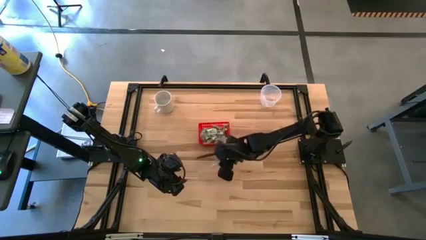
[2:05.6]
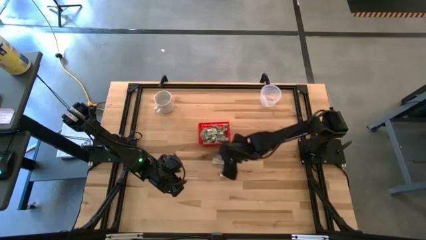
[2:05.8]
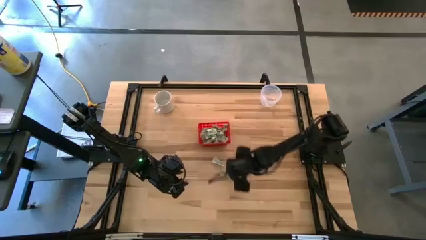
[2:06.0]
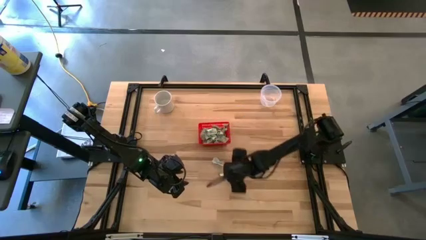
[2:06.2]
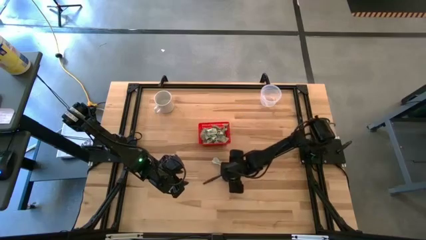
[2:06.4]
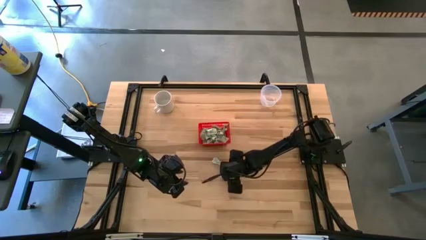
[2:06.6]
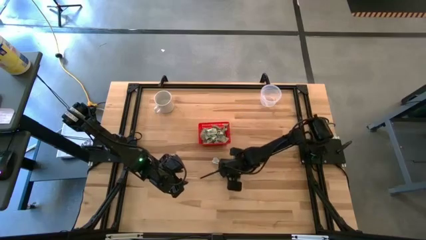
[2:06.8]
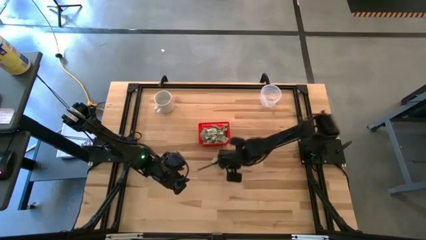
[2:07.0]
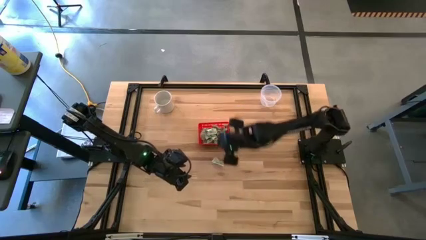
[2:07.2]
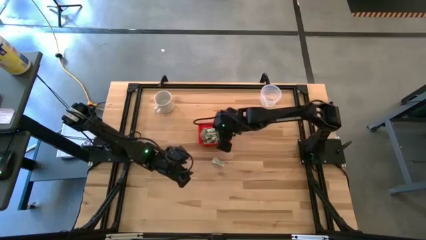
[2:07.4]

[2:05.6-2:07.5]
Task: Pick and place items into bin
Put the stevia packet into the red bin

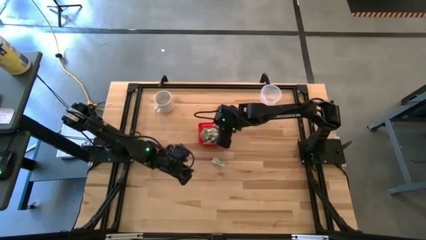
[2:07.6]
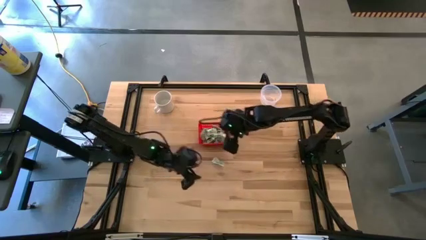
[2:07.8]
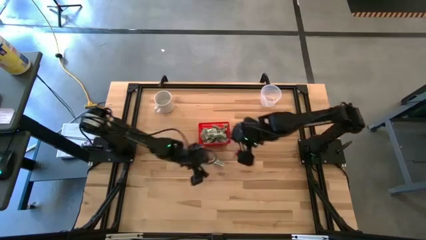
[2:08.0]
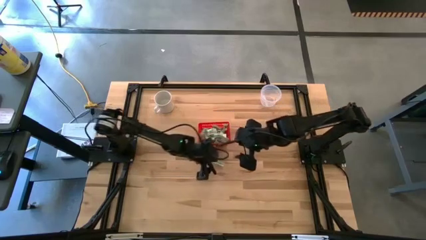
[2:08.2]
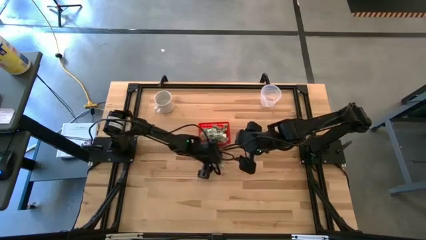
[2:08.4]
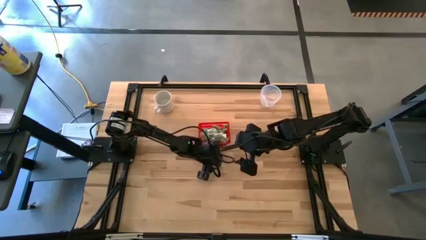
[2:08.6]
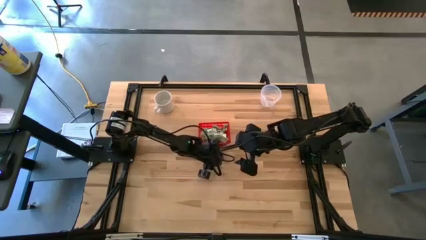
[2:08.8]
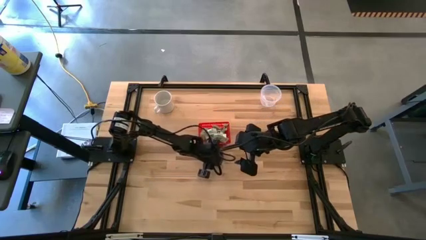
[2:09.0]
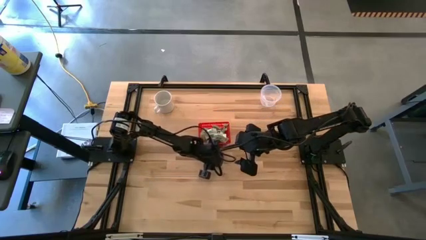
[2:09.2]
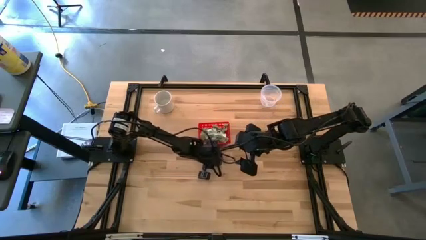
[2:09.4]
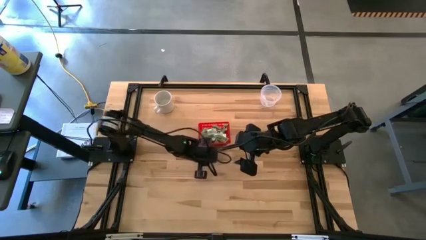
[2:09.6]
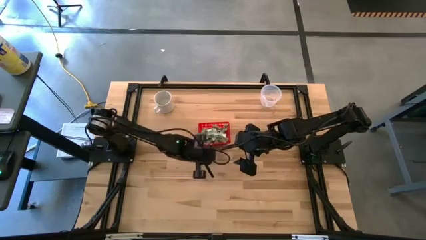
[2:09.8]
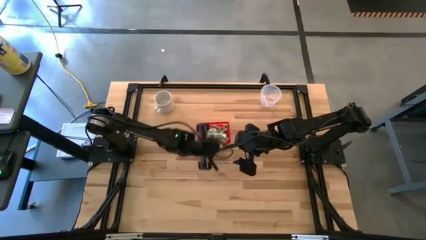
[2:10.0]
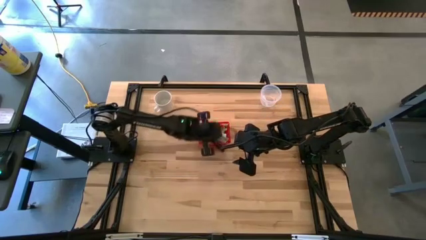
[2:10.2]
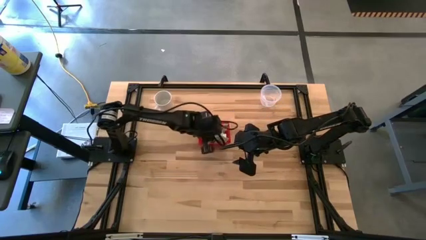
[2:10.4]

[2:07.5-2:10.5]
Put the stevia packet into the red bin

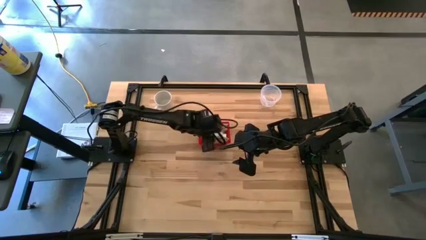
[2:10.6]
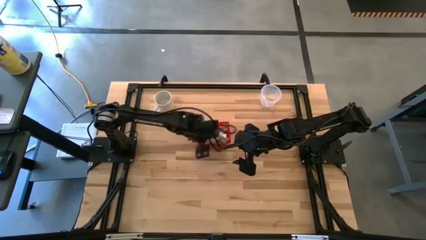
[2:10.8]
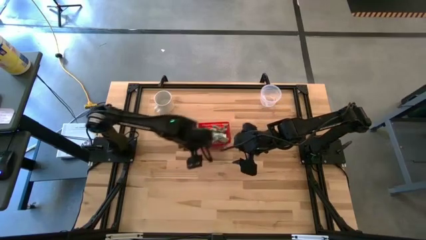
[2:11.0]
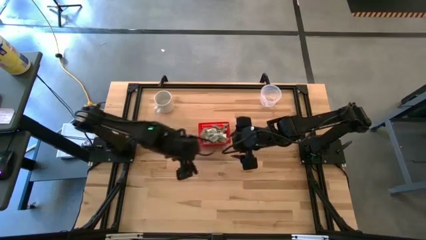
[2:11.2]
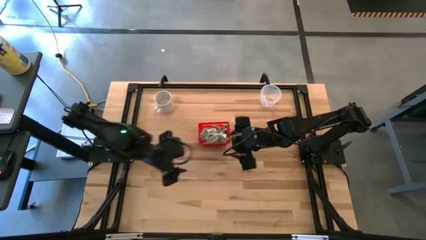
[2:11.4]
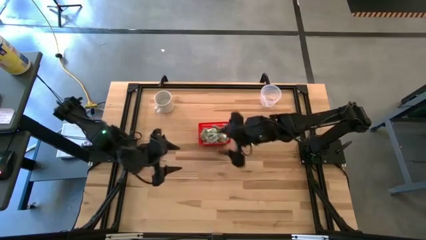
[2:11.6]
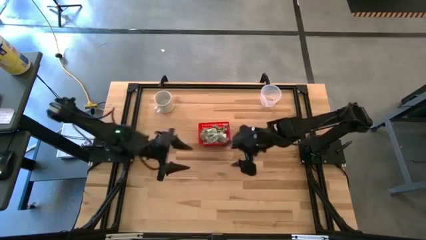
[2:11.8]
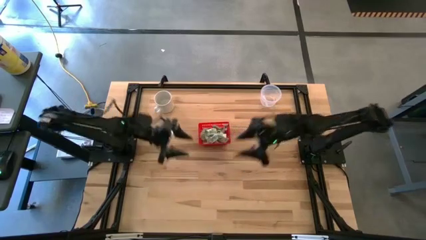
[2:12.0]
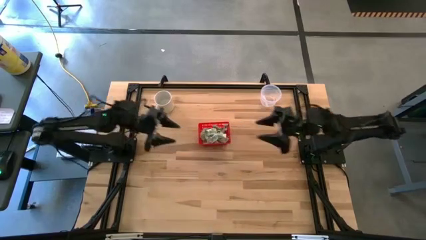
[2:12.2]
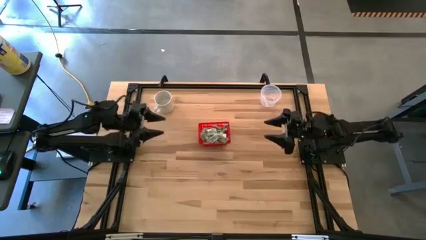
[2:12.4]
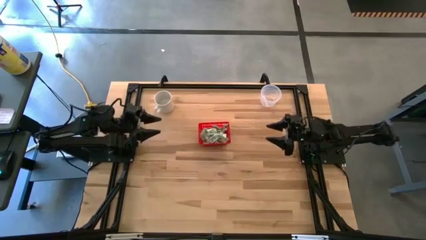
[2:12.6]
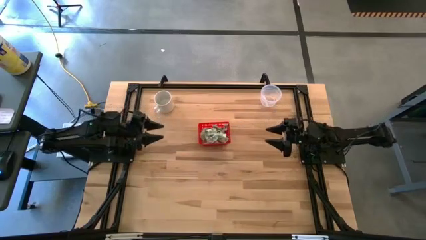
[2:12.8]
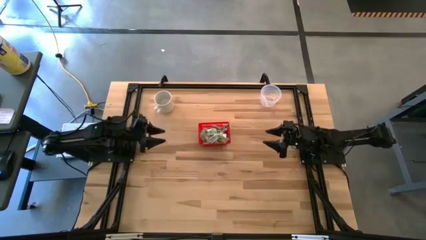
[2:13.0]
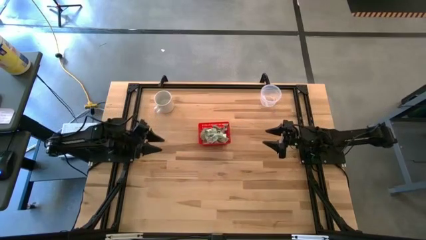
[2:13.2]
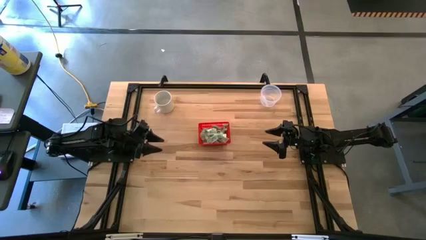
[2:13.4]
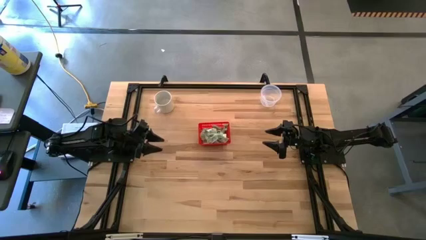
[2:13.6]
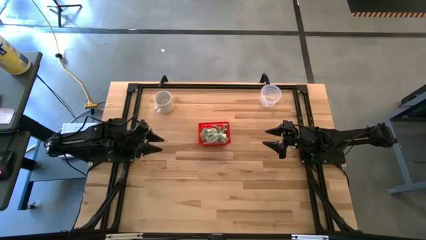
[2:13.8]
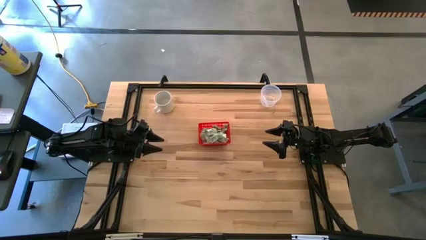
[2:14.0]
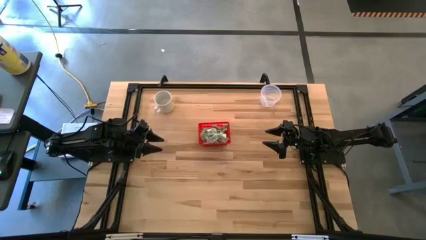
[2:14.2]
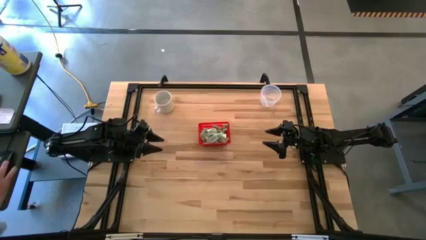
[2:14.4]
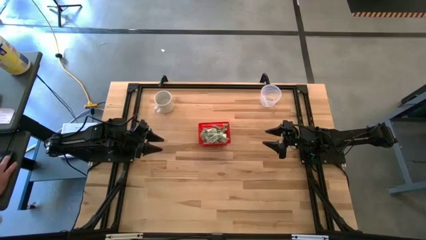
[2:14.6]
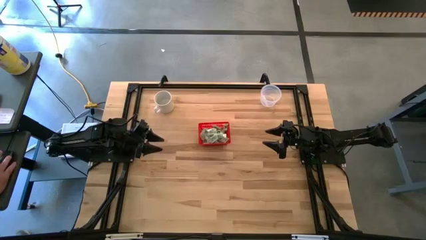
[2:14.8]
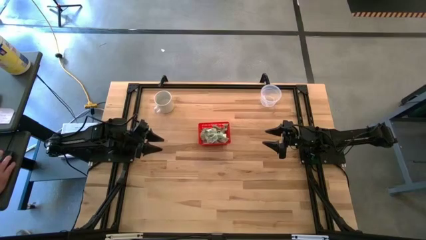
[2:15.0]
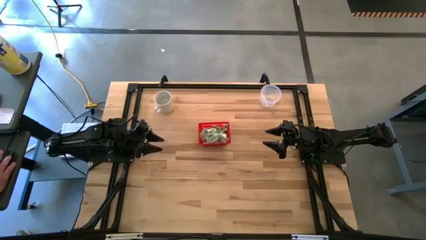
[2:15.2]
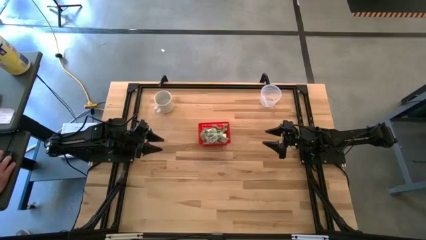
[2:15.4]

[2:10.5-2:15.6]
Return to Home Position

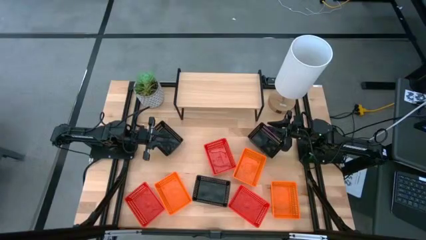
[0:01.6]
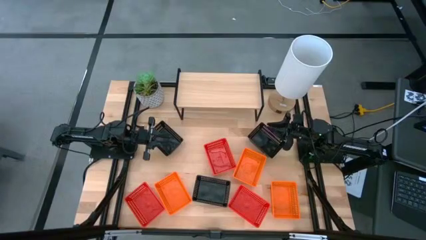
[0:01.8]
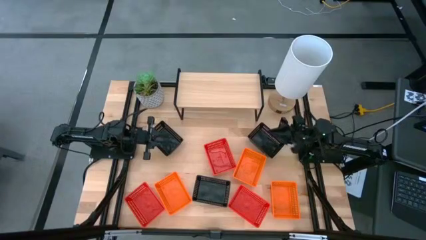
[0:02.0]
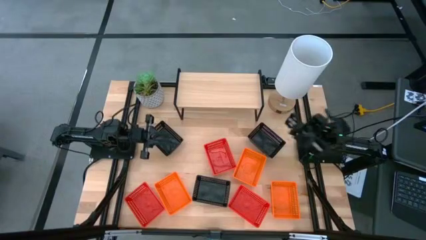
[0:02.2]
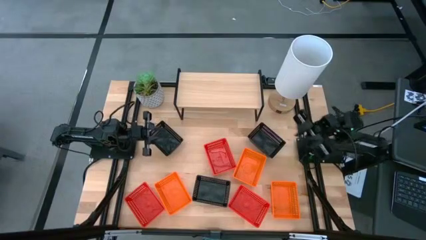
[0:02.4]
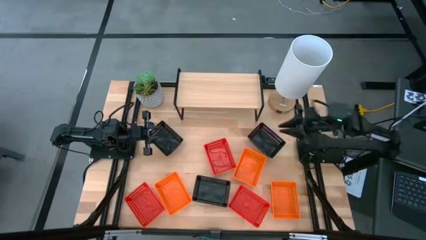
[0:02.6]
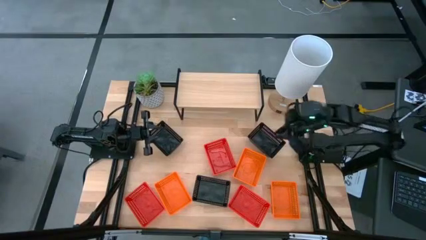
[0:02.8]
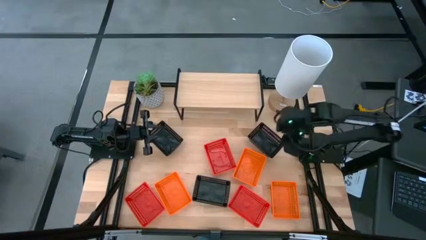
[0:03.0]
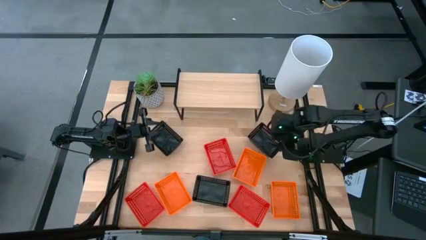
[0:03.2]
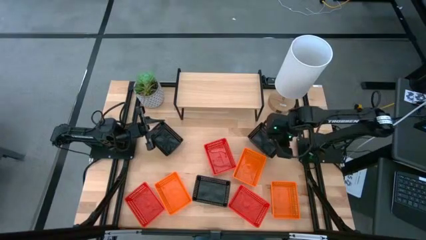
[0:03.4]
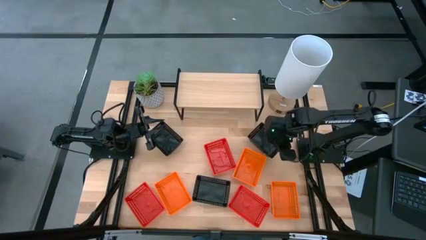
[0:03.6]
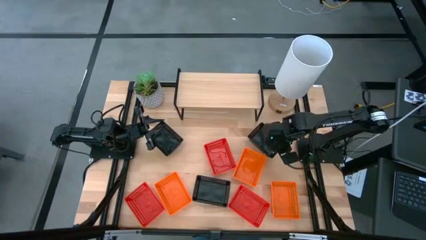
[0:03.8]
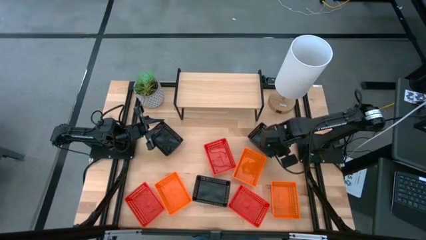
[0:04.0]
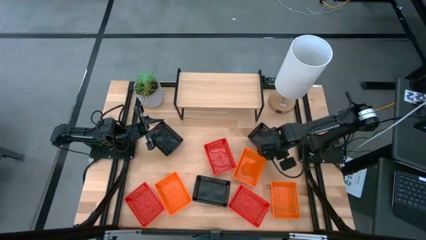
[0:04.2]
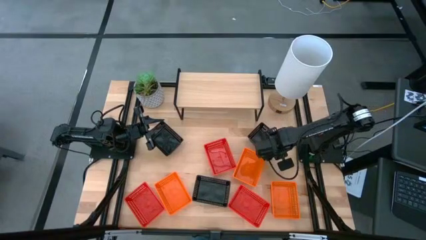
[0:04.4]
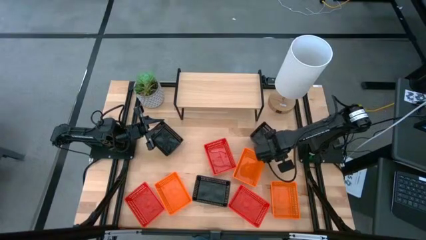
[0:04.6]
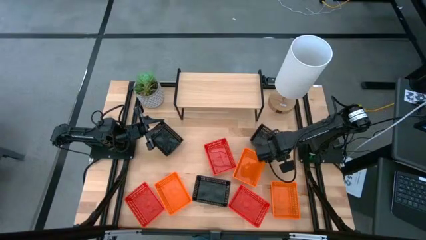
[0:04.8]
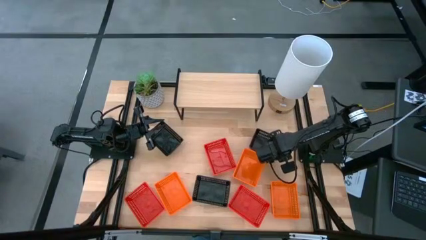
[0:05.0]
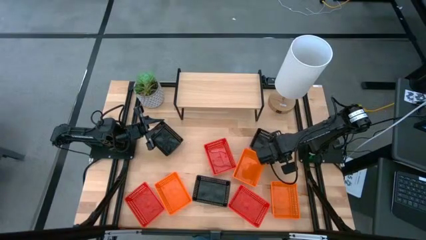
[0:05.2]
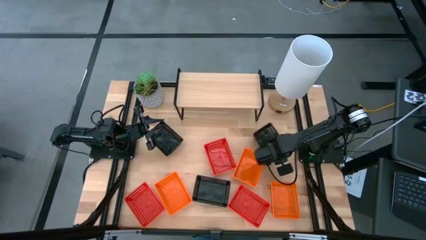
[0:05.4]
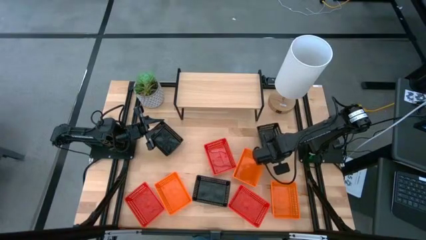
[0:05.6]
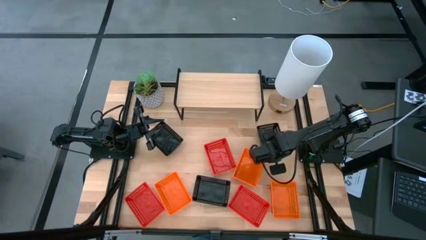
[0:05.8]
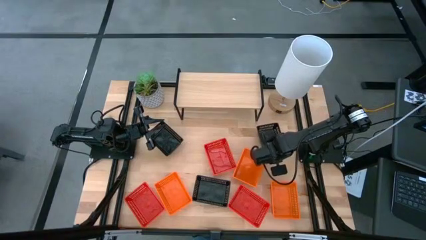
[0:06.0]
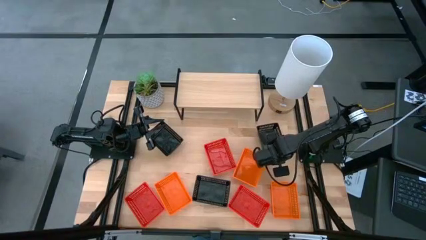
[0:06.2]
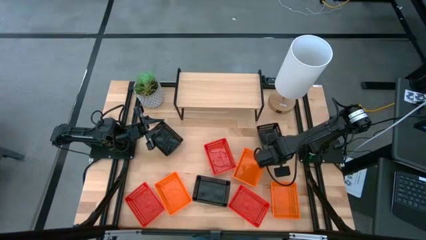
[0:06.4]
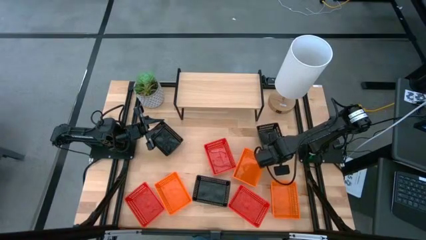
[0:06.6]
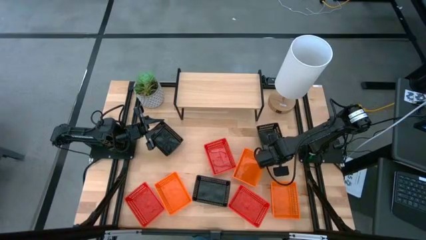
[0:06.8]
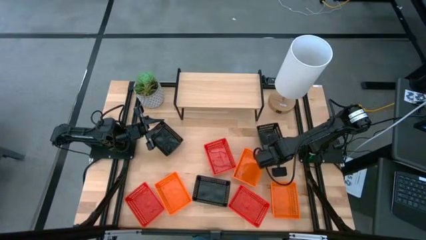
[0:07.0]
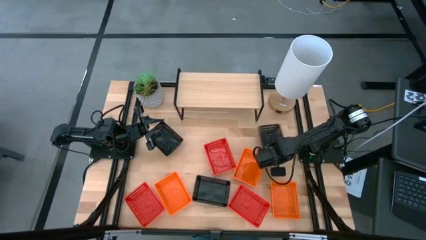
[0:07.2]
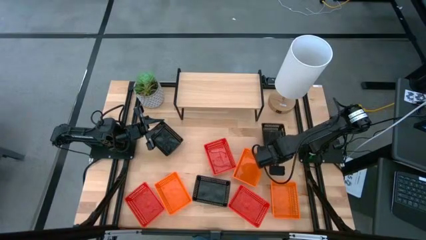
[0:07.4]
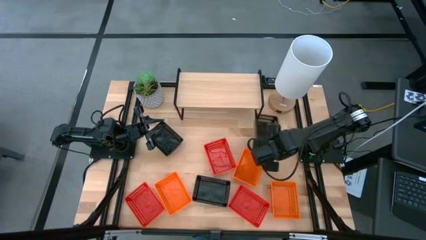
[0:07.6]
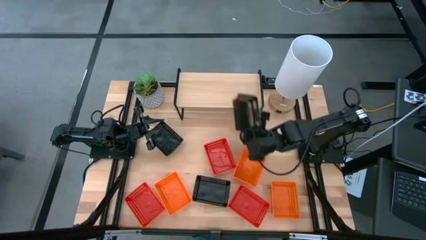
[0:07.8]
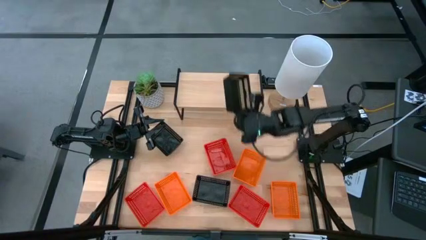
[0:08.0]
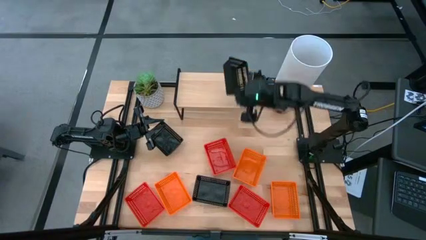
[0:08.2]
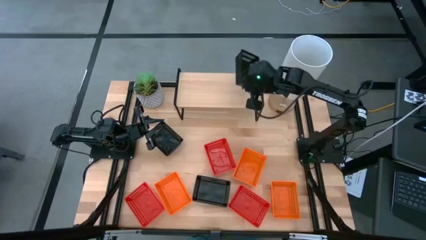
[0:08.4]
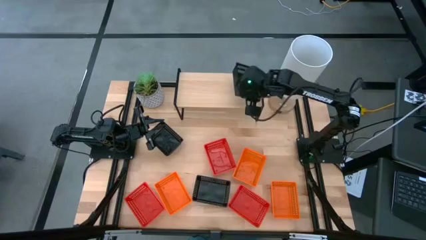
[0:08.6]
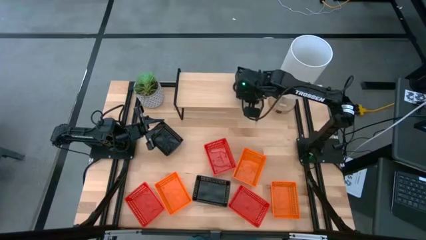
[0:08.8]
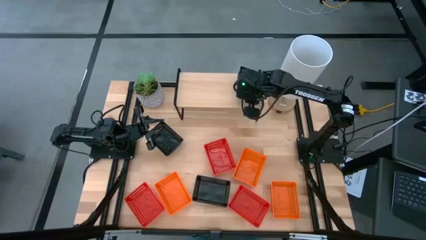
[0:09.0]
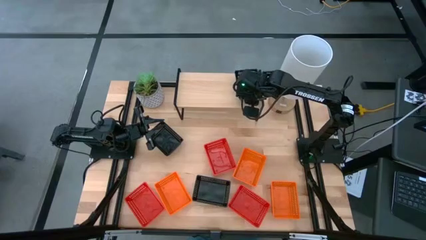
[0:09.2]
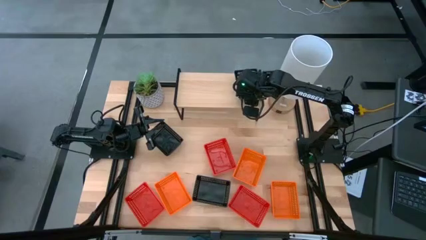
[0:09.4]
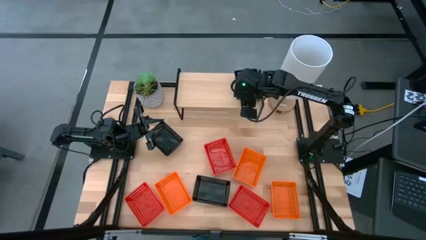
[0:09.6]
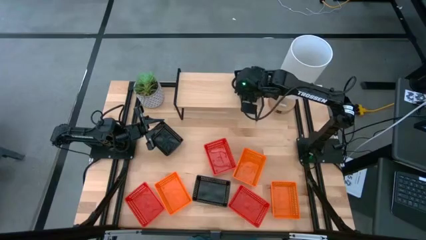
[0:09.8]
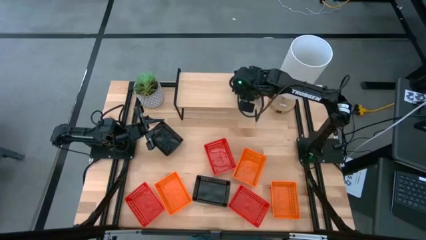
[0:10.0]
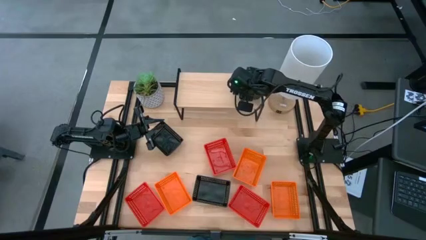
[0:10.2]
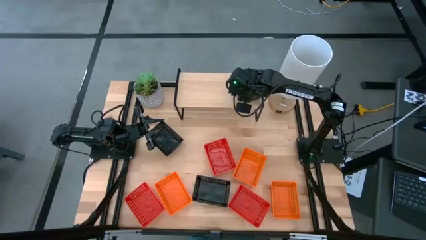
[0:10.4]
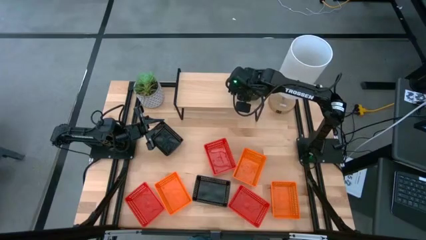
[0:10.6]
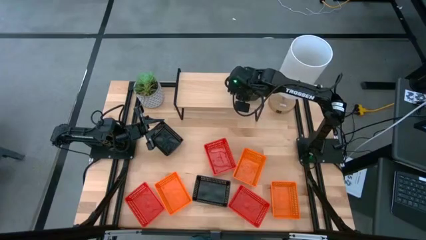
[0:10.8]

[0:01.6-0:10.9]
Task: Stack baskets on shelf by color
Put the right black basket on the shelf
